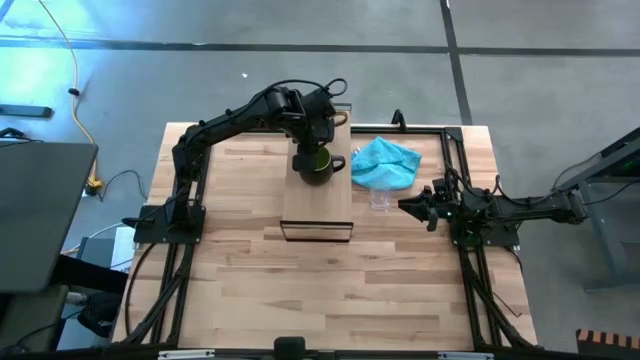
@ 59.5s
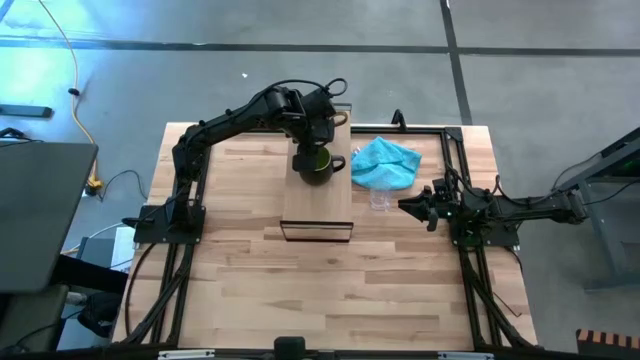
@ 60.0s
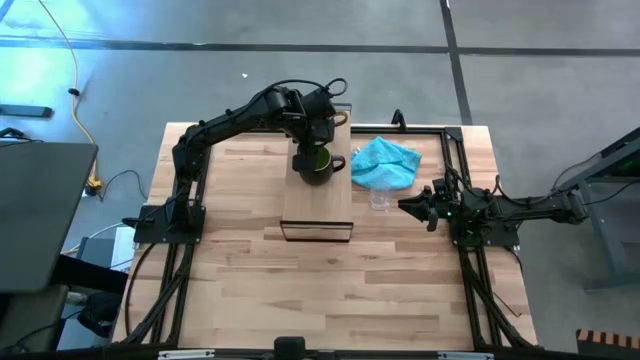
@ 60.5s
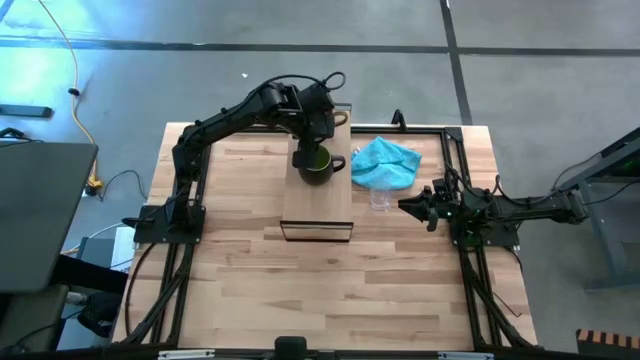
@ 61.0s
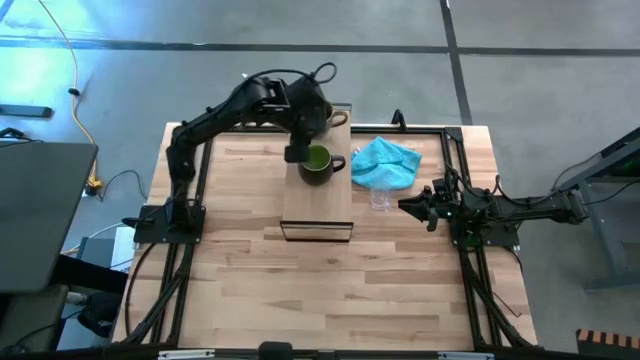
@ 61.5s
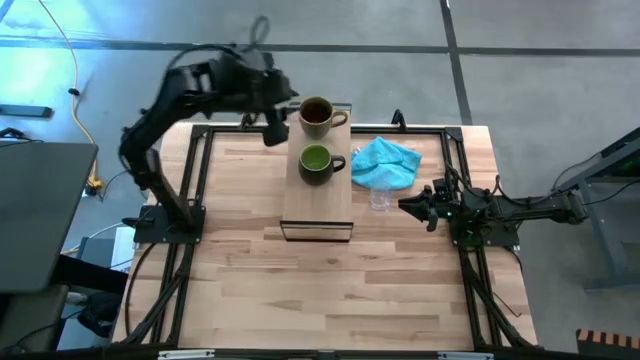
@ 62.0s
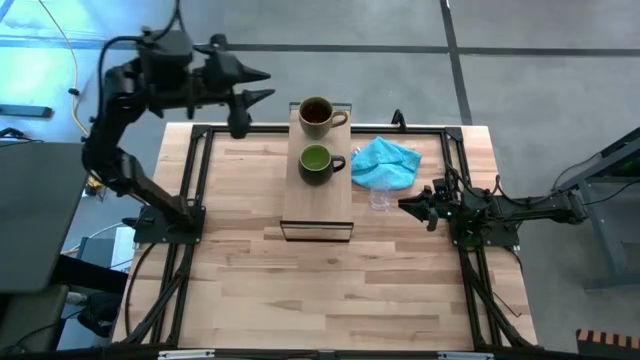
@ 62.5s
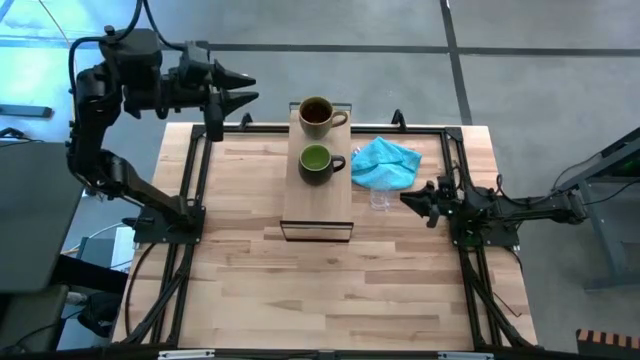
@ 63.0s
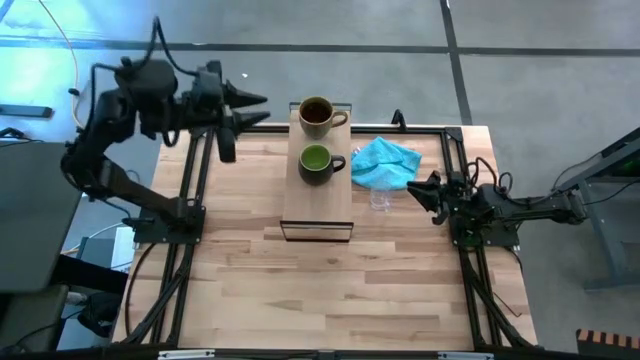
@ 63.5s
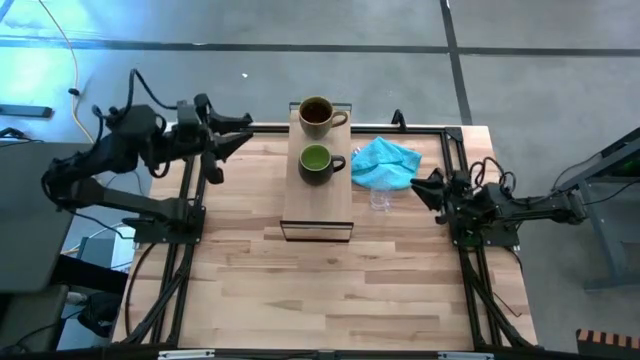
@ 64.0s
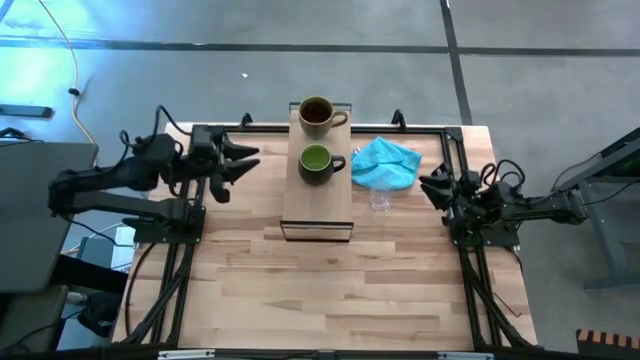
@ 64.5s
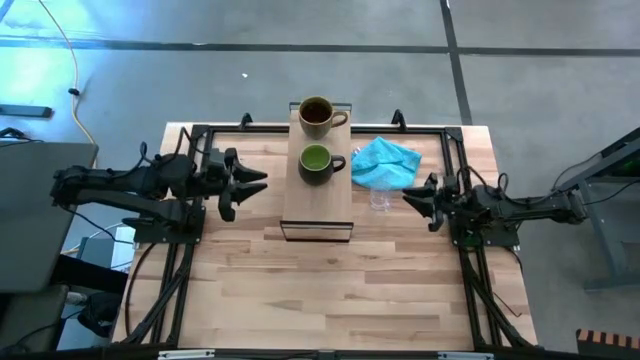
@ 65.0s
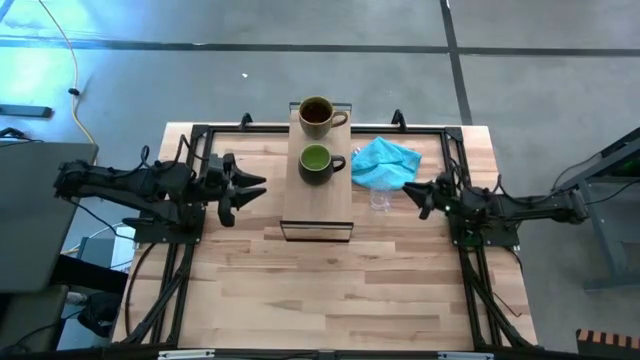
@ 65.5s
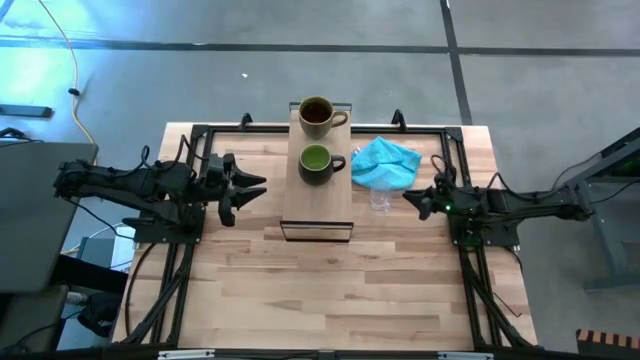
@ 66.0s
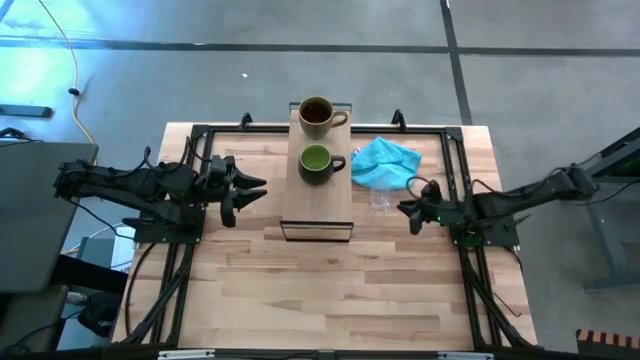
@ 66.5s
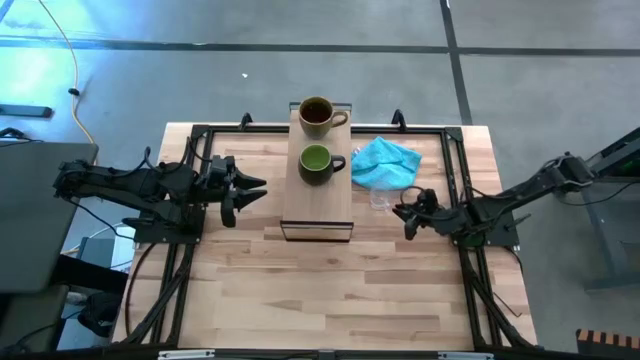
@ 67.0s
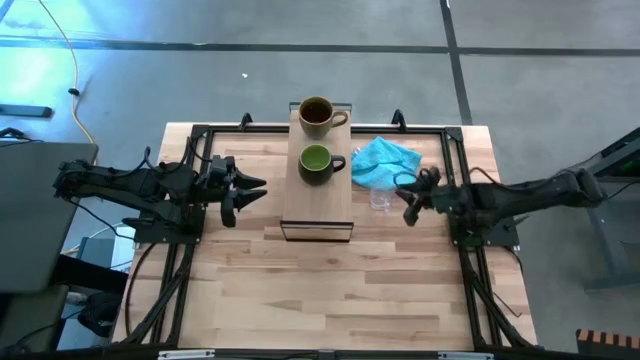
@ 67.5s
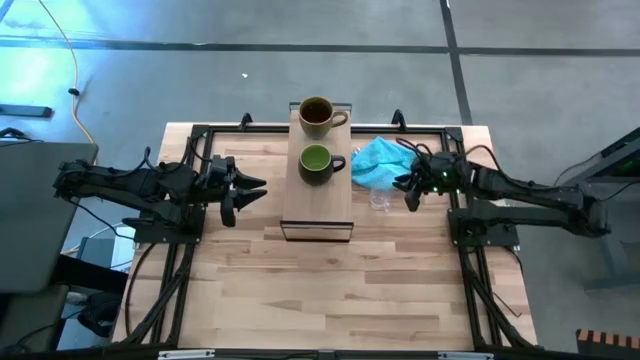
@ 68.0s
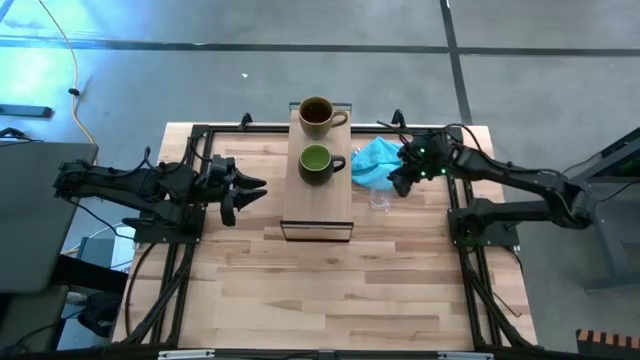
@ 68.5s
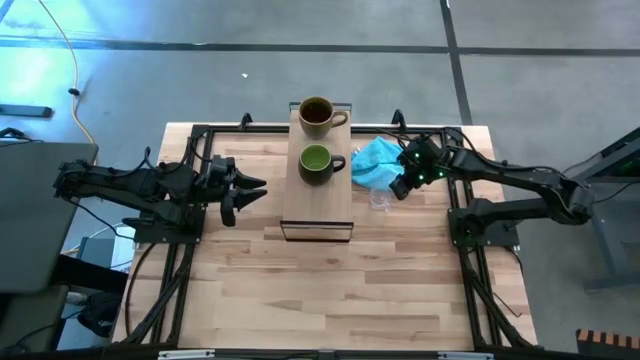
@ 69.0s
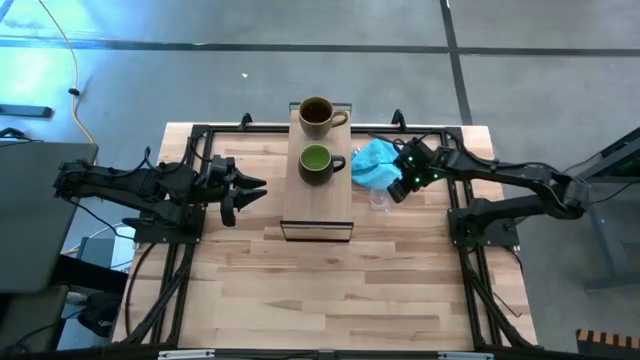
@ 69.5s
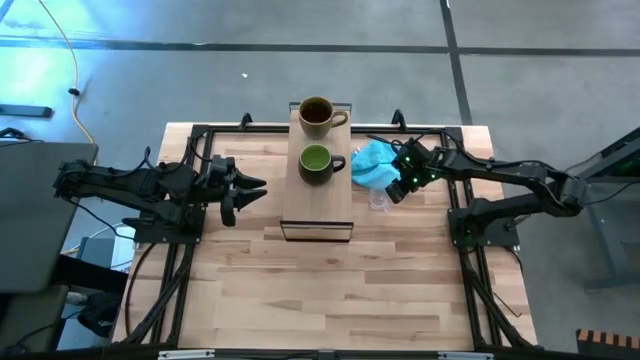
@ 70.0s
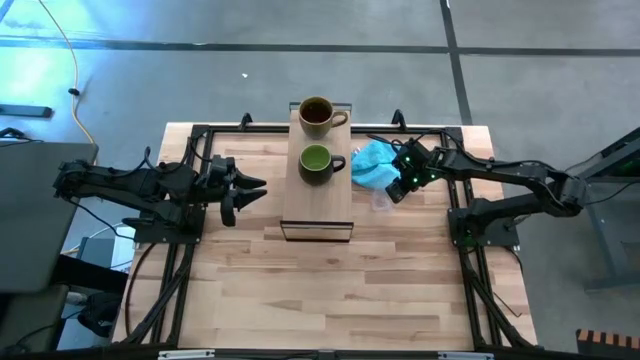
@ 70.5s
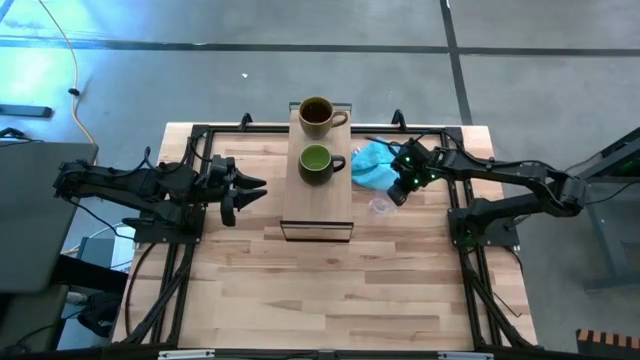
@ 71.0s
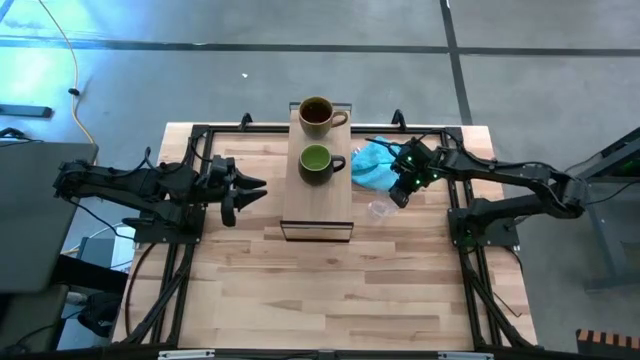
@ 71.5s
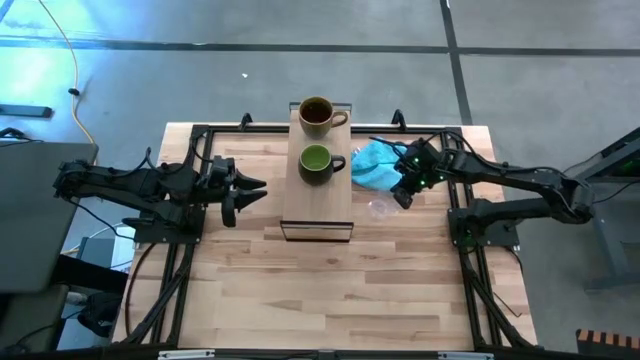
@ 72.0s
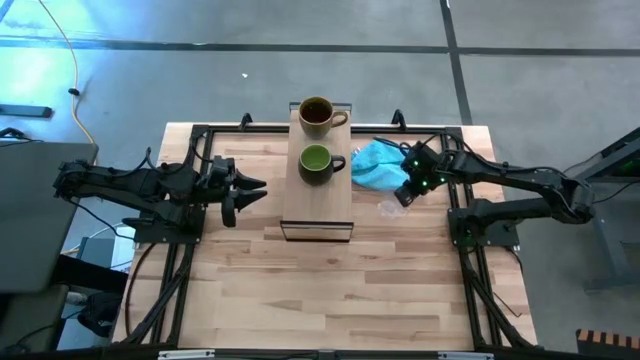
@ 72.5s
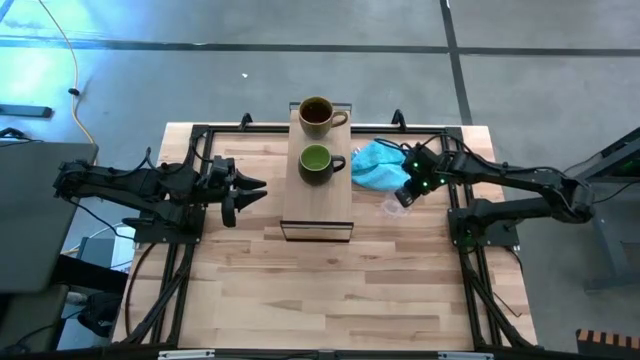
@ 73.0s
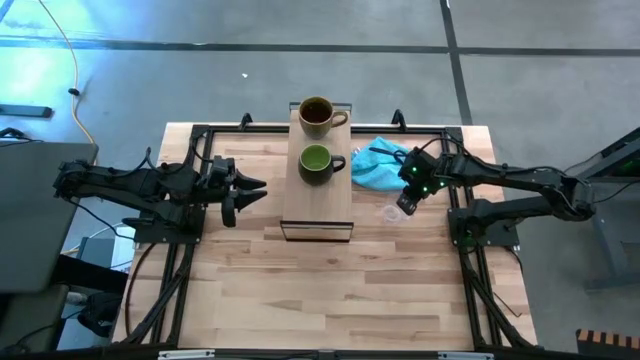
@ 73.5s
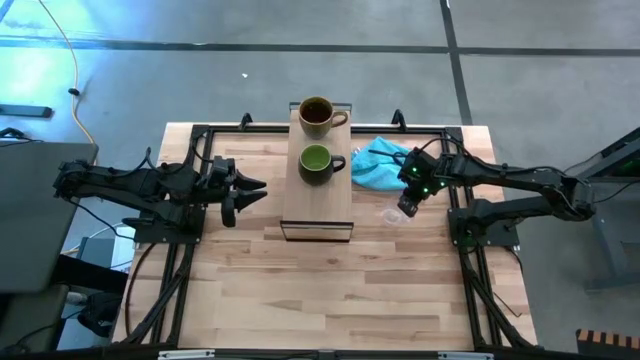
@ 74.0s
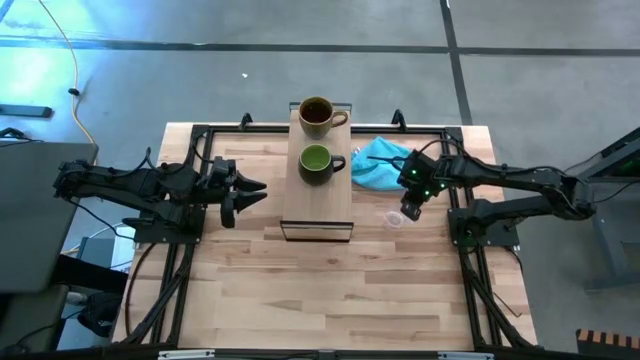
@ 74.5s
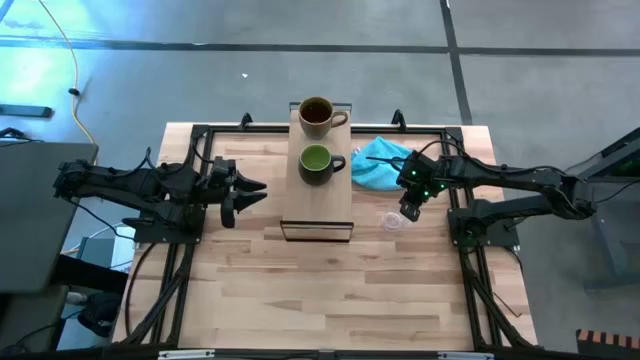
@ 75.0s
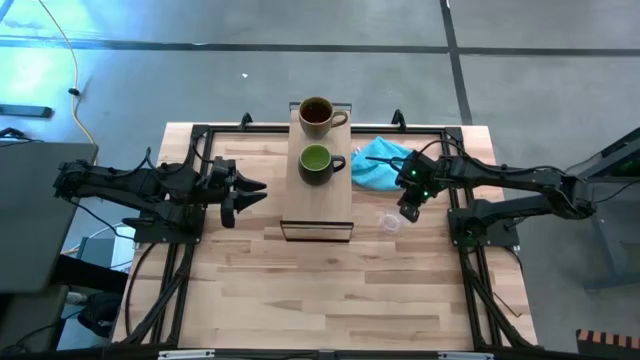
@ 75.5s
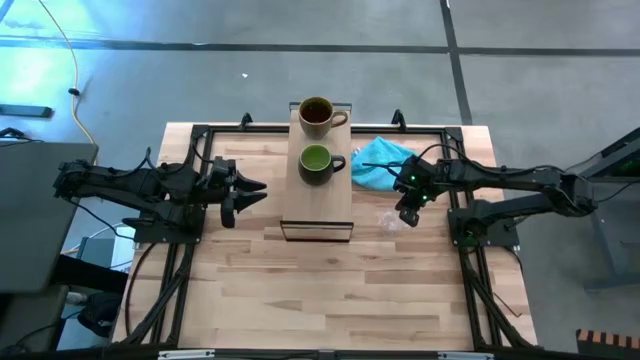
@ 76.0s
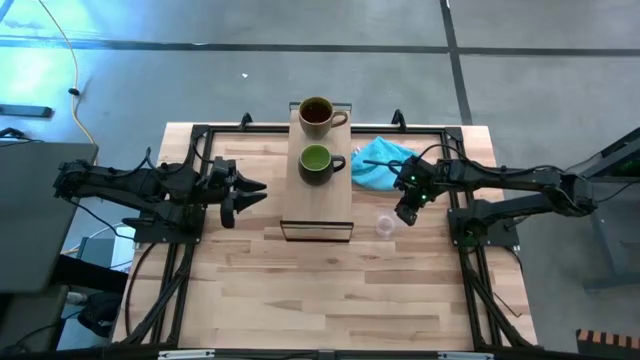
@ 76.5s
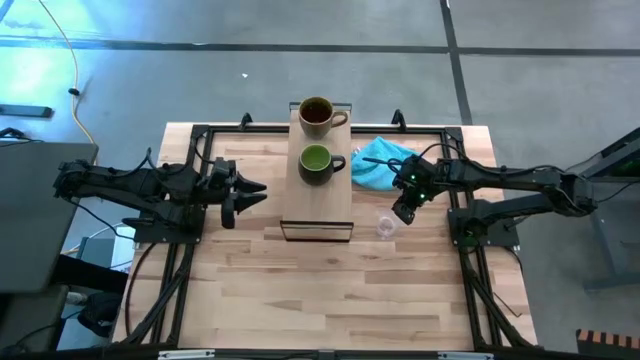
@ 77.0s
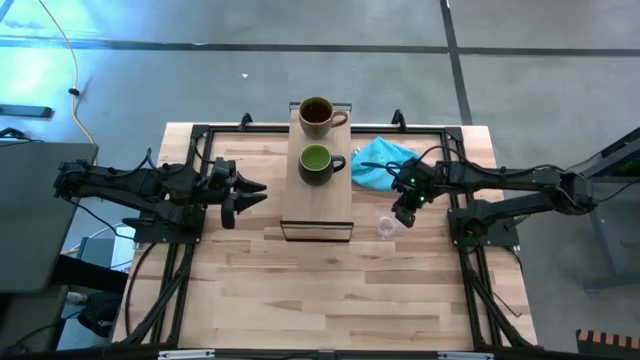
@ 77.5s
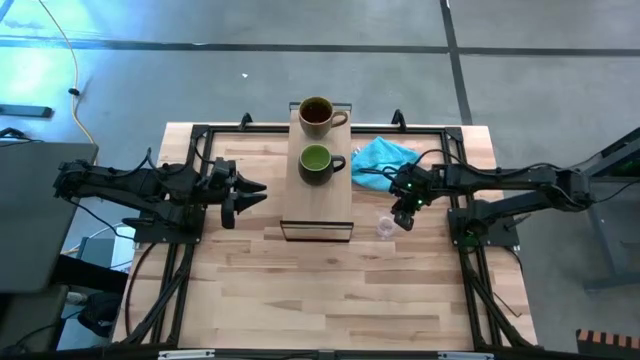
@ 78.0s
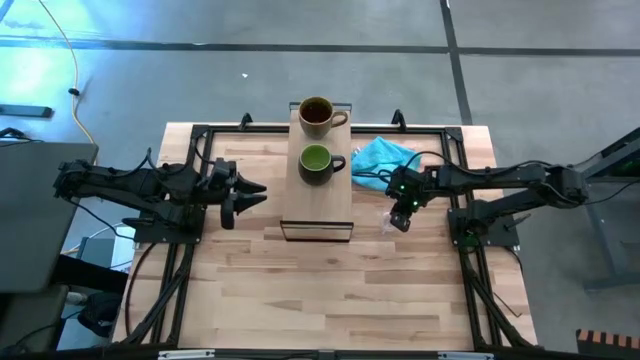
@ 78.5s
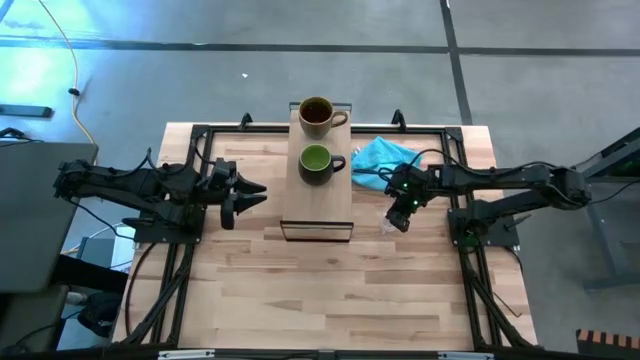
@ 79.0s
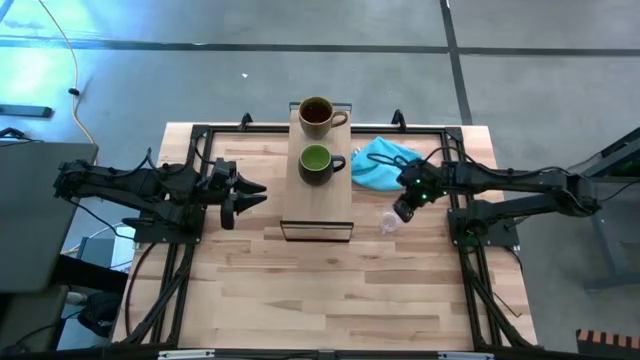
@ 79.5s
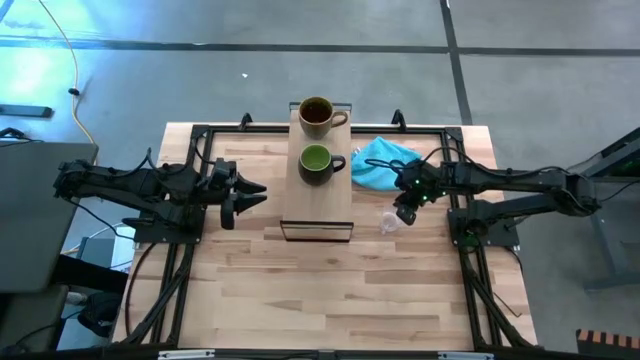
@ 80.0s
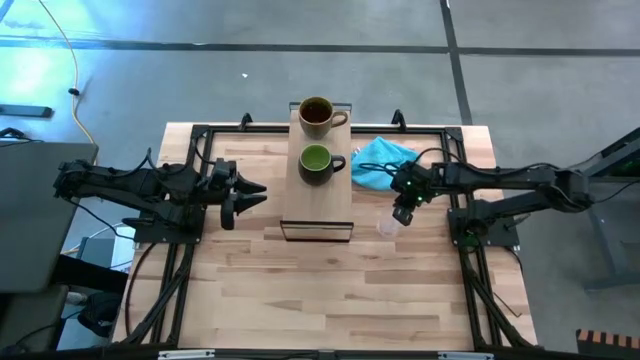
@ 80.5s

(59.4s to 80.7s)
Task: Stack small to large cups/mugs on shelf
Put the transparent mug on the shelf
